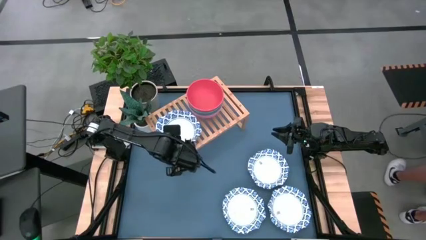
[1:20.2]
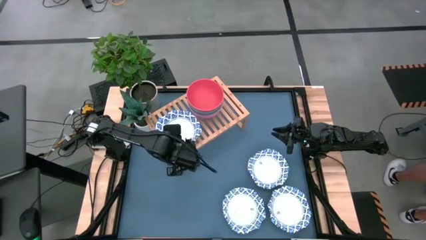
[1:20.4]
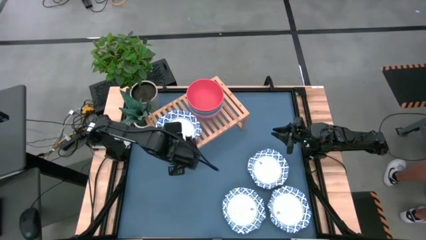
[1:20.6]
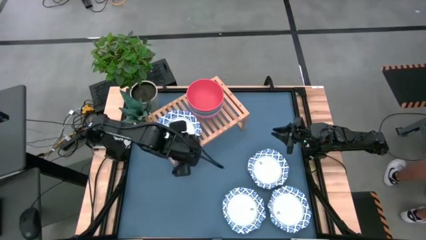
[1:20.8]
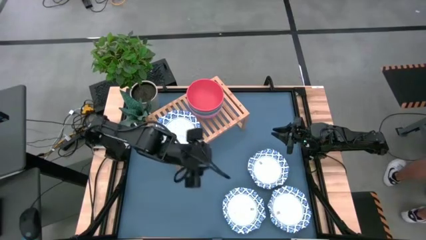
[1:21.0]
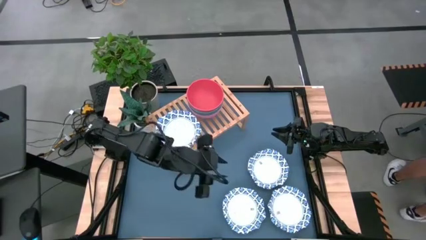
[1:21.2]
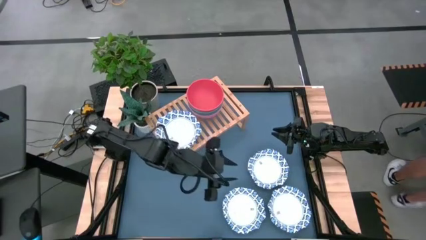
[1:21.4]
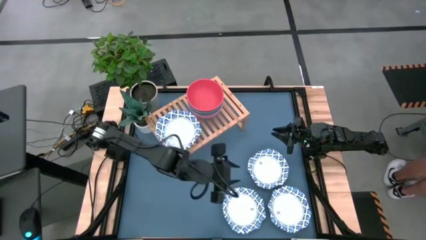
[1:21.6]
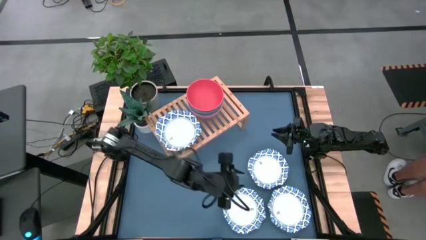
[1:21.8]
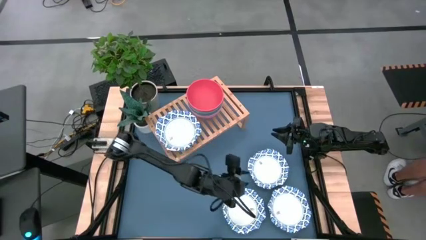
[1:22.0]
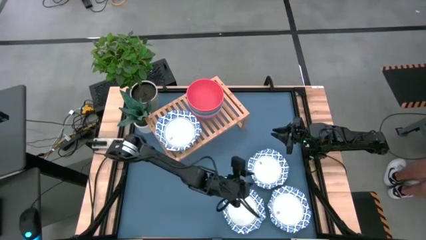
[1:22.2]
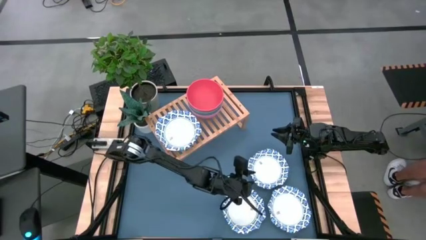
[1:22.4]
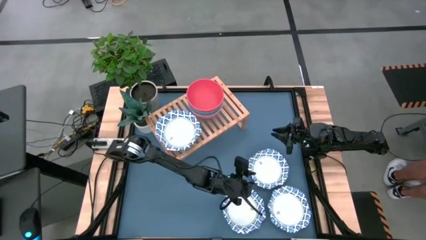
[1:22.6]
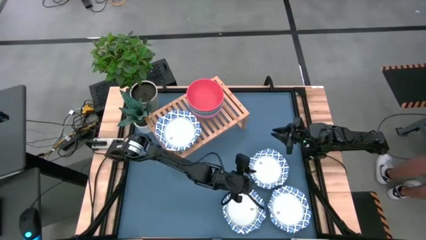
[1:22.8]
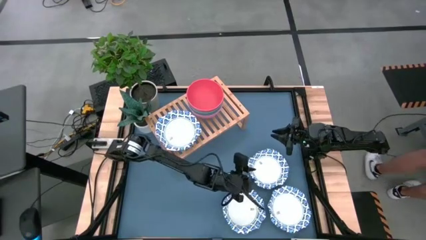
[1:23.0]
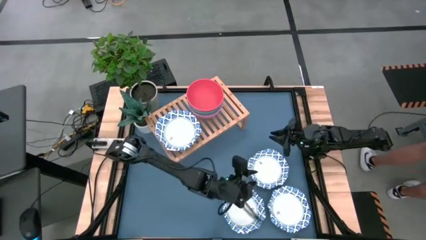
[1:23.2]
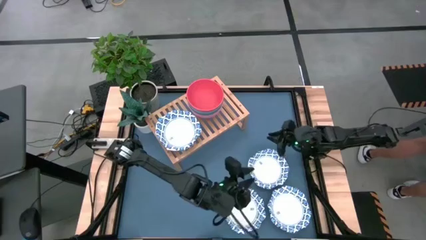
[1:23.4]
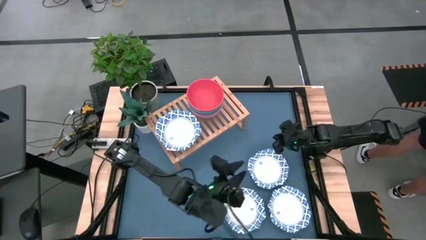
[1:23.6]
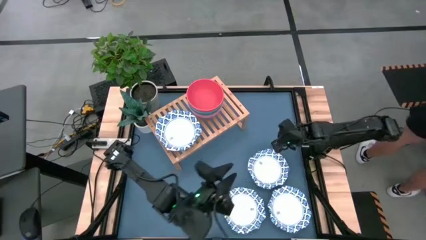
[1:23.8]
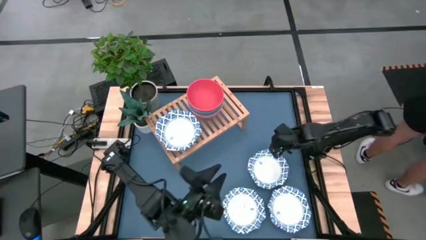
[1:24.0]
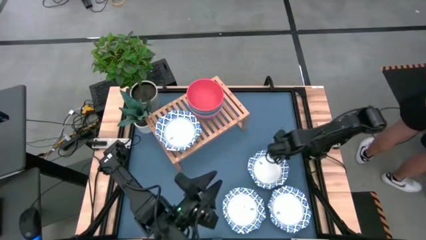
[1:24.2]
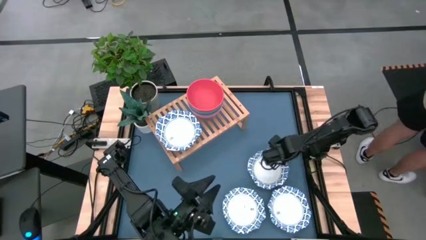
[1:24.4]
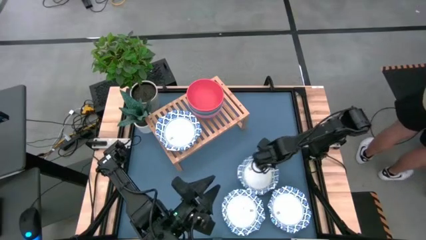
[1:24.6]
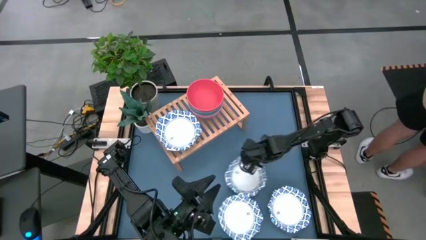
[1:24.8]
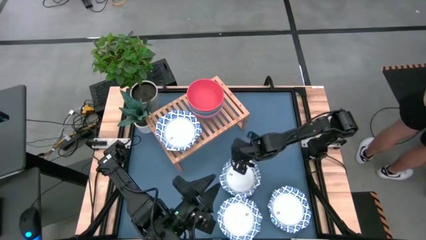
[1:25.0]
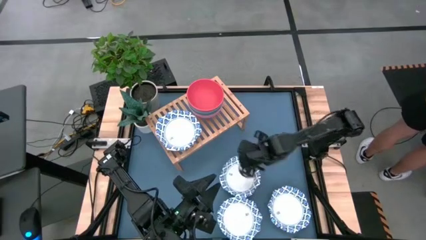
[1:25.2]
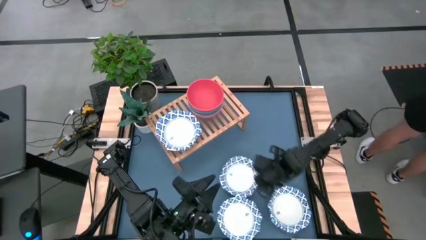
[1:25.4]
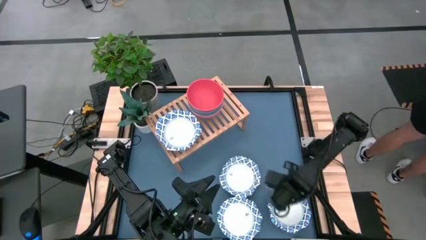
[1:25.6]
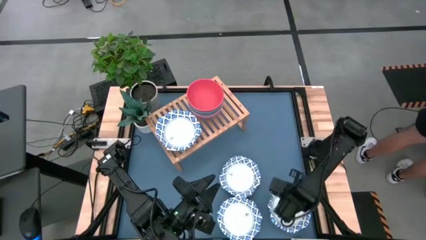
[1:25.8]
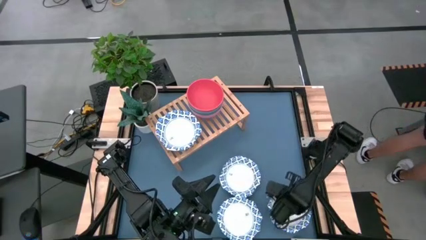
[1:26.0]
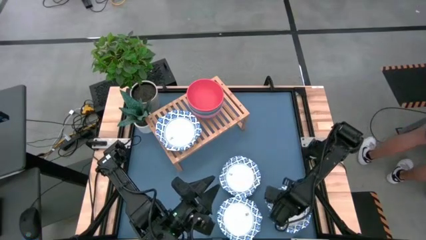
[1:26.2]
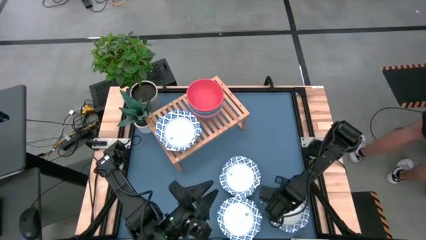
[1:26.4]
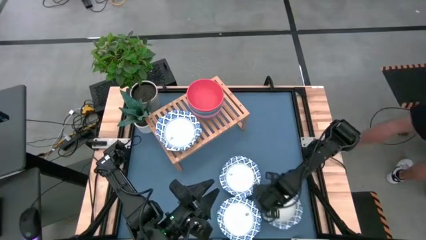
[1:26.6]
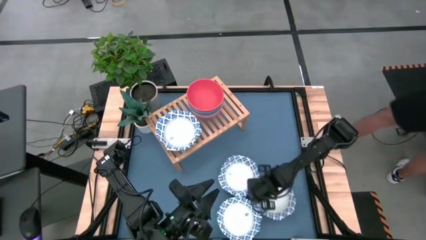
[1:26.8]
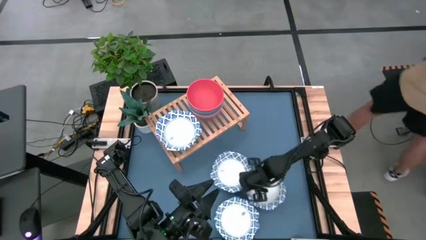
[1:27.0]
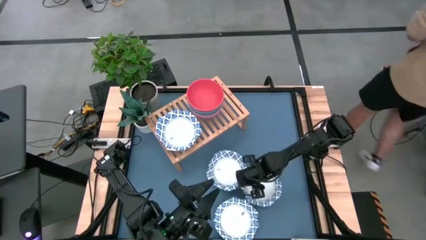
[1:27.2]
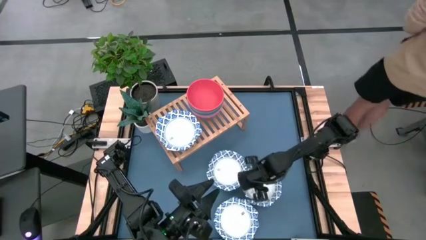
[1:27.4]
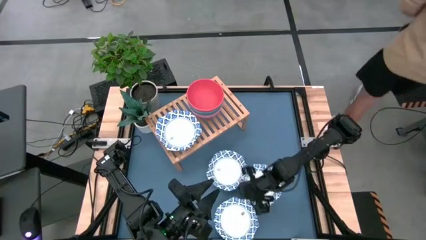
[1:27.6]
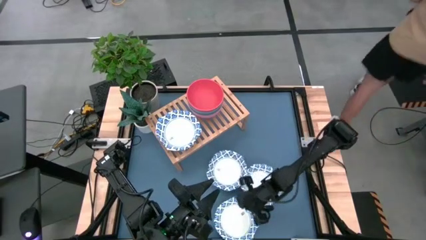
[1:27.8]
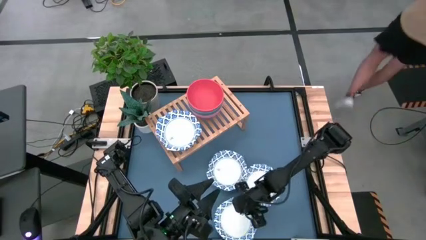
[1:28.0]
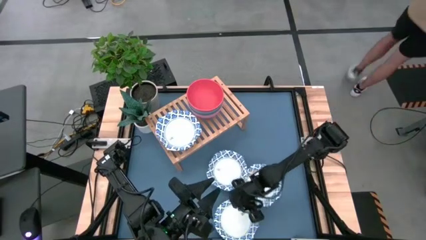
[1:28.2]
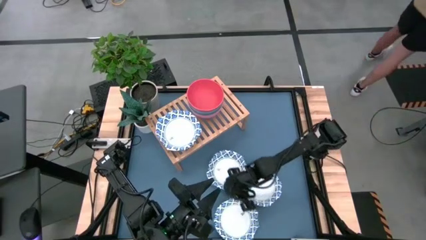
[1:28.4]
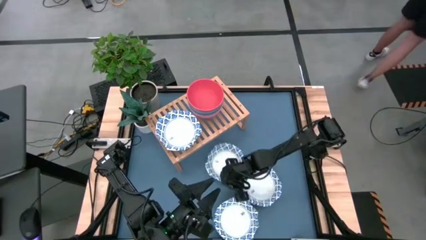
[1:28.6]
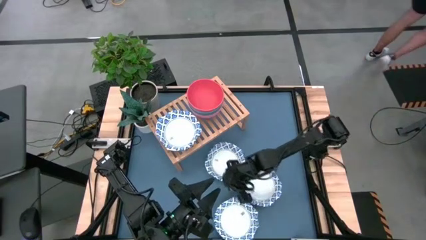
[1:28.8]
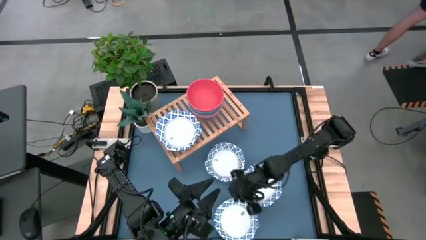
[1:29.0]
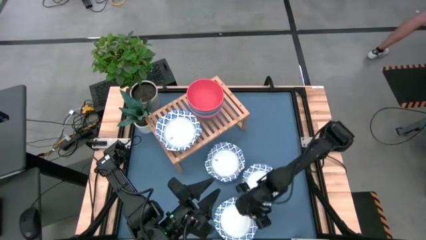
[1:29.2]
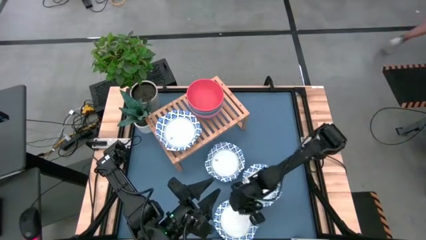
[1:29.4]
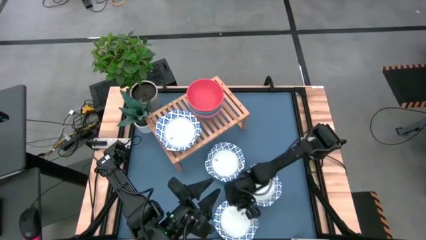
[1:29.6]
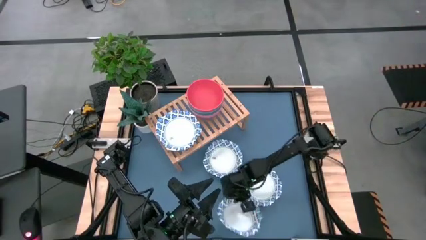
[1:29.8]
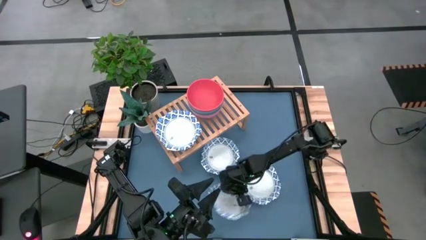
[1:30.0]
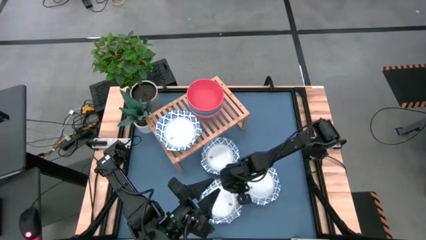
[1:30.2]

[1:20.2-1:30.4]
Task: Place and stack bowls onto a shelf
Adjust the white patterned bowls

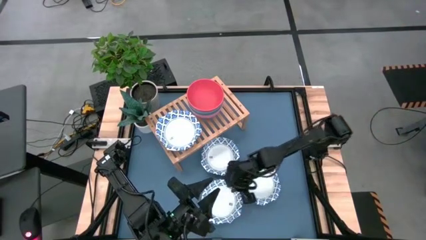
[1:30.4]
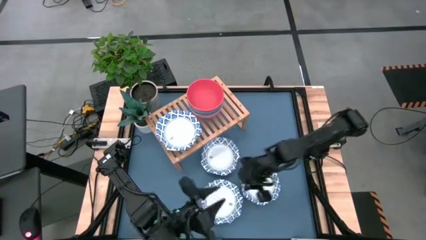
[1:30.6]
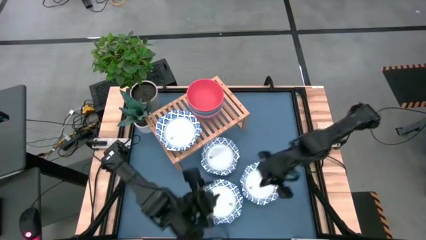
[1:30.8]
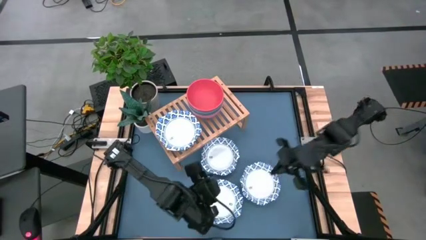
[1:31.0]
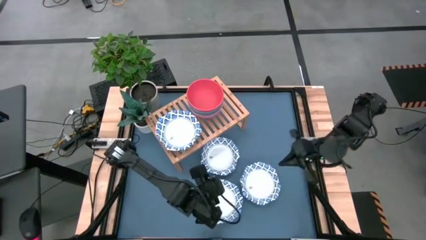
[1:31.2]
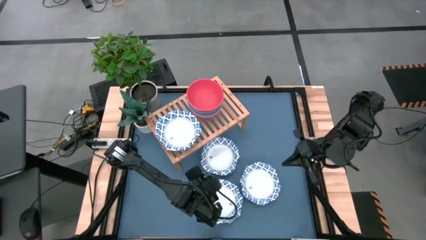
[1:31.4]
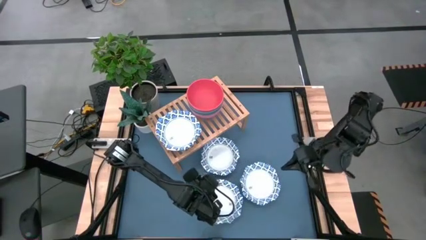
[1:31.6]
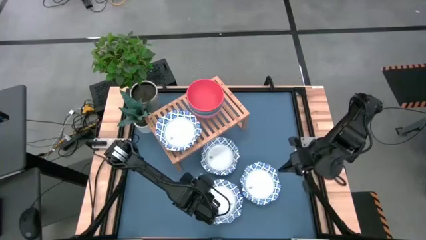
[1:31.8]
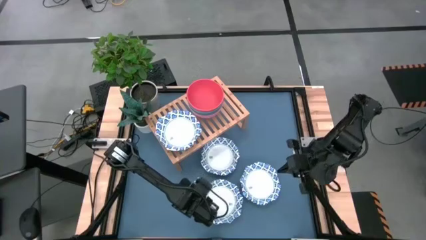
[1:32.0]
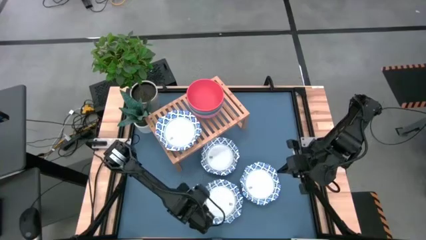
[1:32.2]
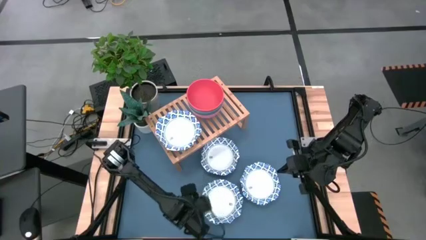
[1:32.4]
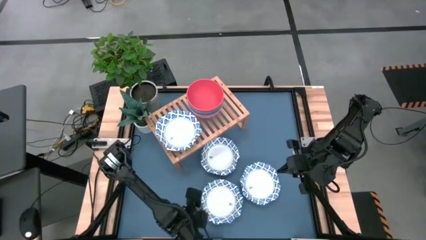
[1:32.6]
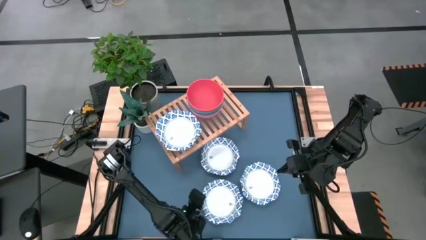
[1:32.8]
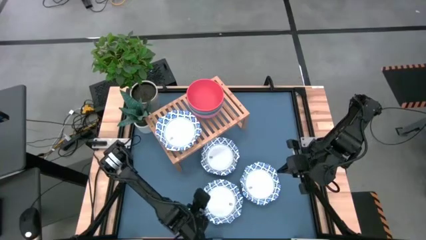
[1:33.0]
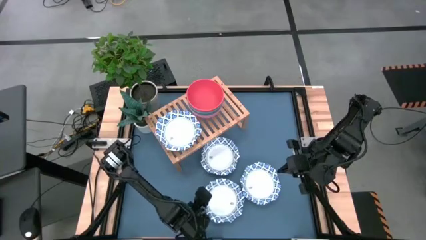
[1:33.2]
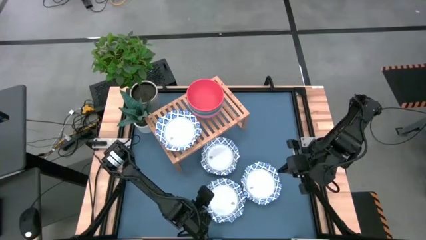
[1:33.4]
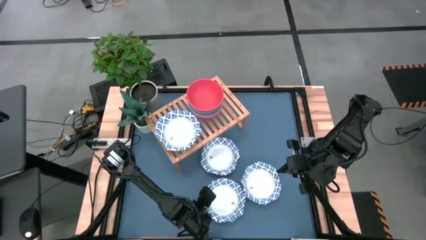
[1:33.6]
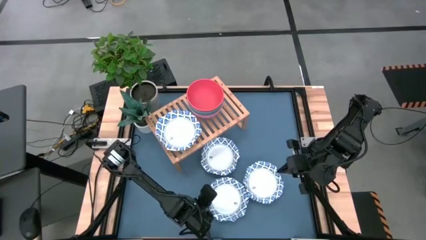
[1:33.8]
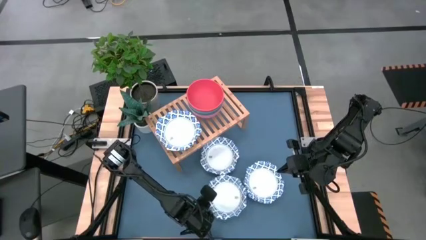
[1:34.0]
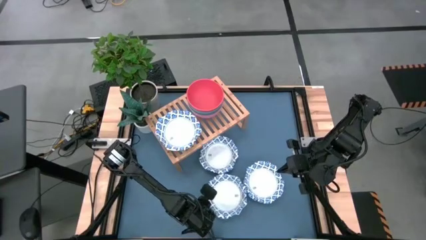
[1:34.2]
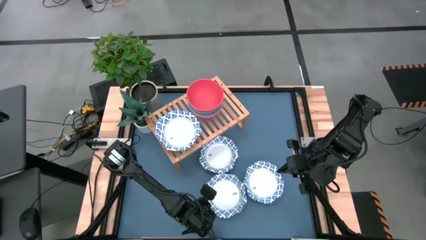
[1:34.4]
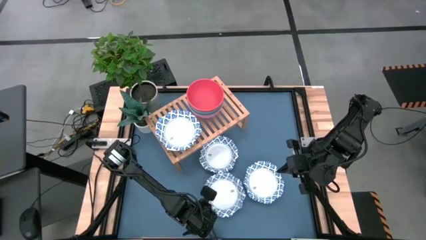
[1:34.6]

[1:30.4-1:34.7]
Stack the white patterned bowl on top of the other white patterned bowl on the shelf
